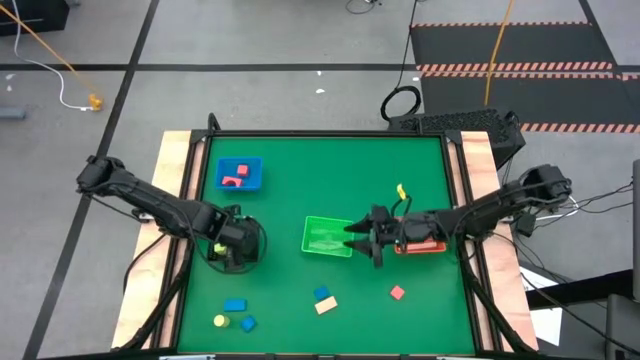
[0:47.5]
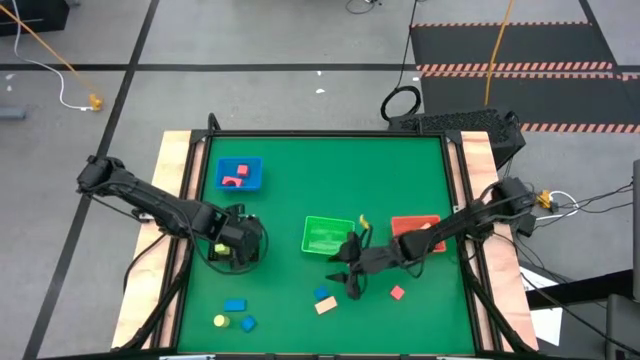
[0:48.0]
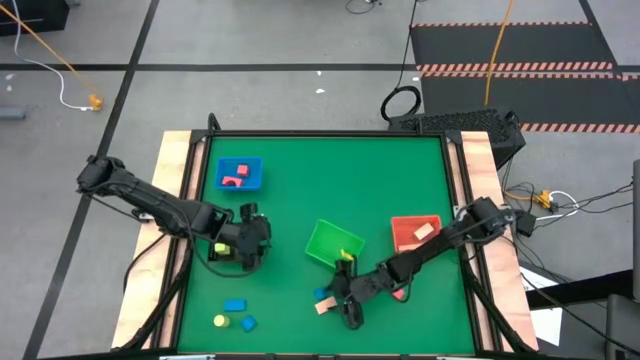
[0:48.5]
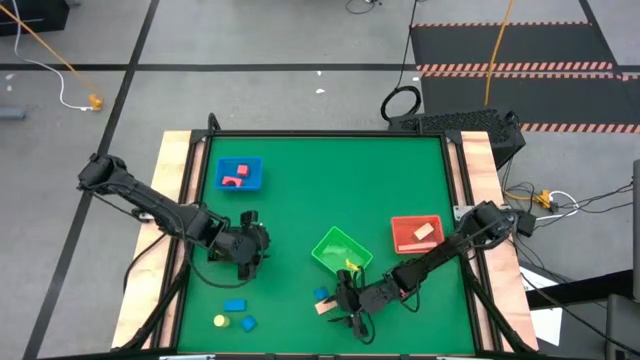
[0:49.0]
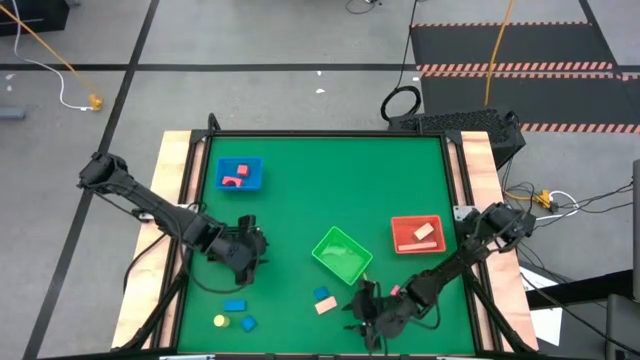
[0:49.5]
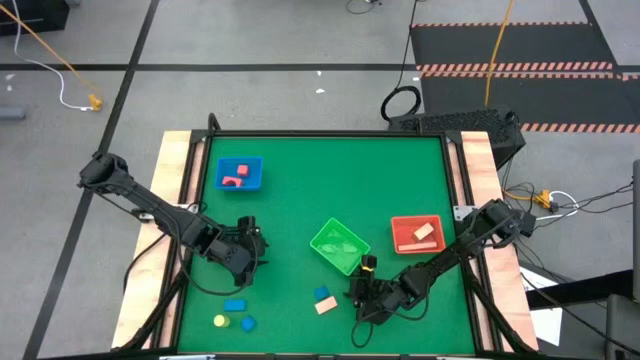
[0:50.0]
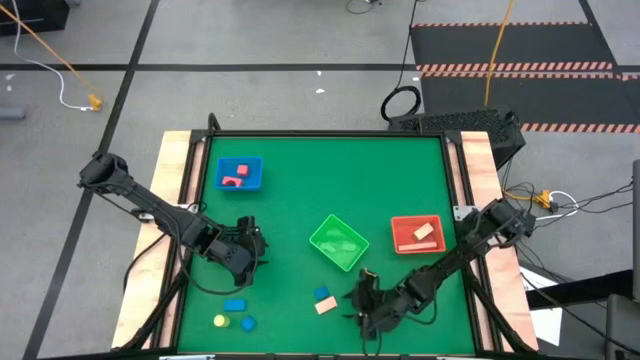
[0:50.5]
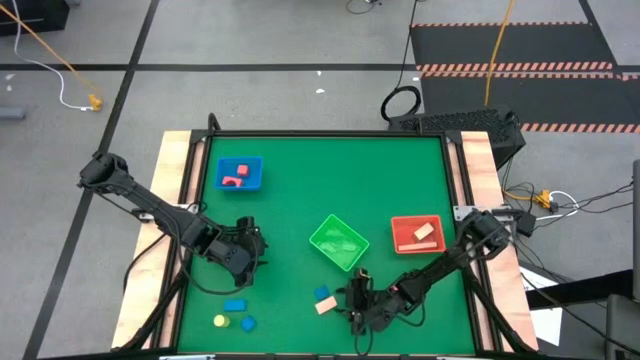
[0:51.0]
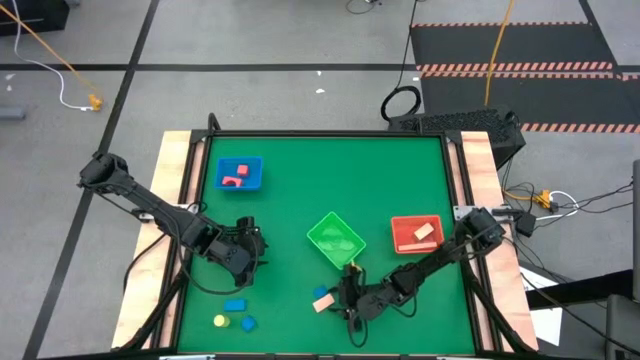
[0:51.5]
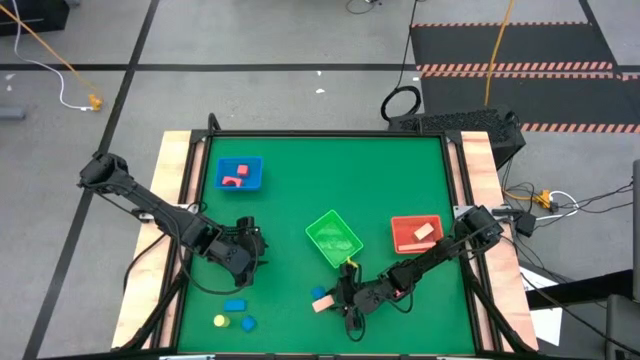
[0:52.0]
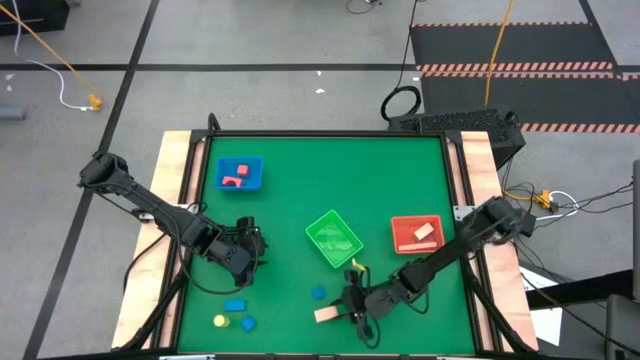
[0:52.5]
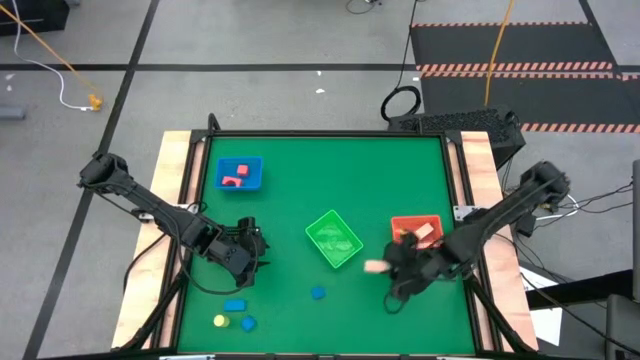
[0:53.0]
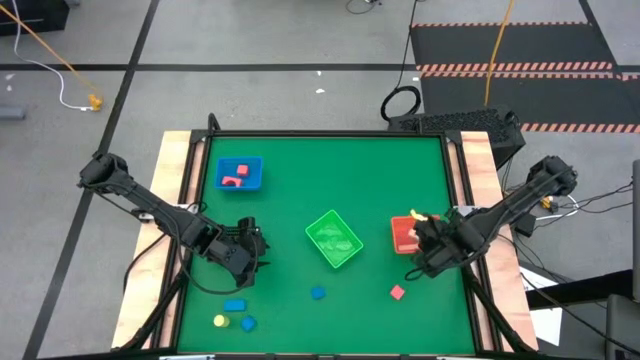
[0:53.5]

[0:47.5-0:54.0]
Task: Sort & place blocks by color
Put the brown block into the orange basket

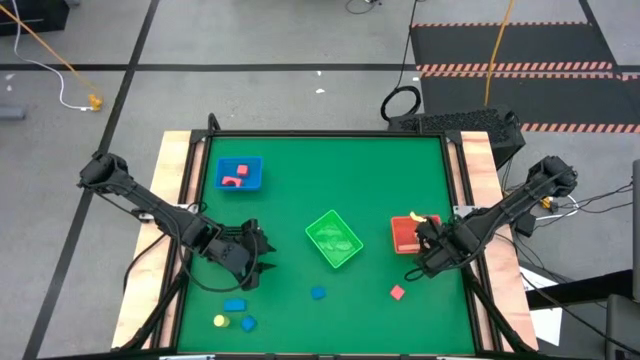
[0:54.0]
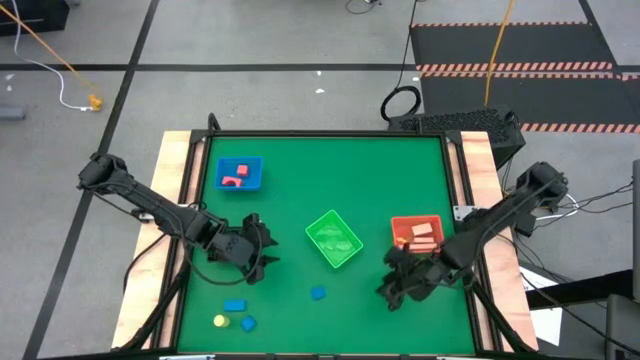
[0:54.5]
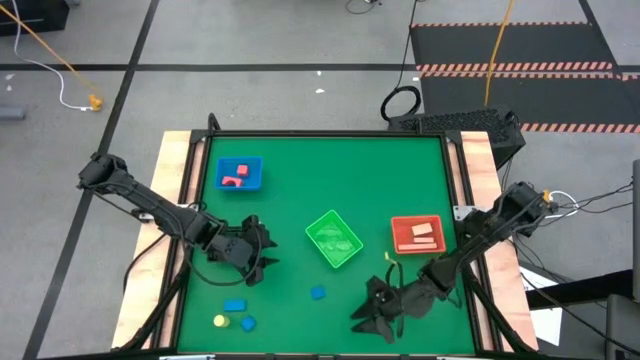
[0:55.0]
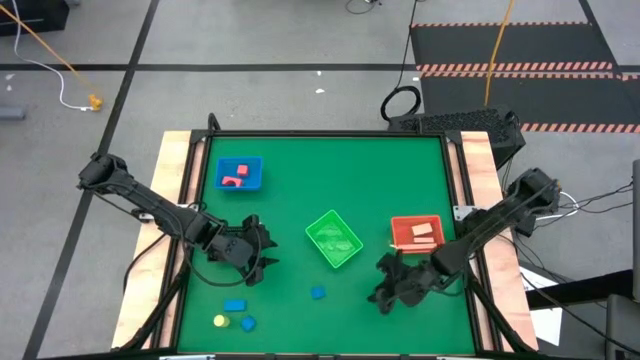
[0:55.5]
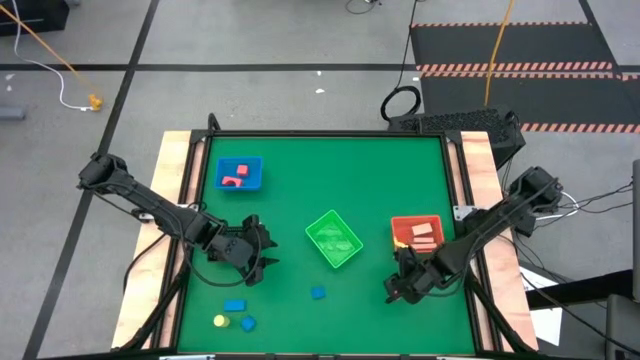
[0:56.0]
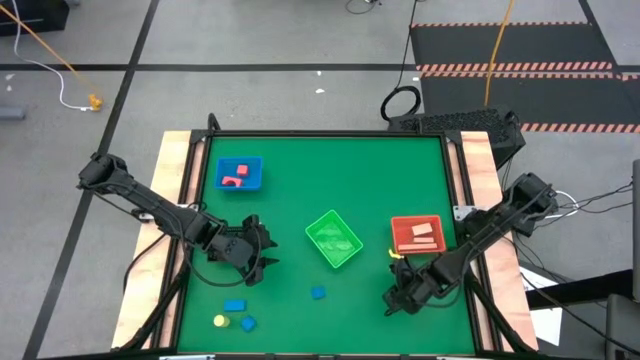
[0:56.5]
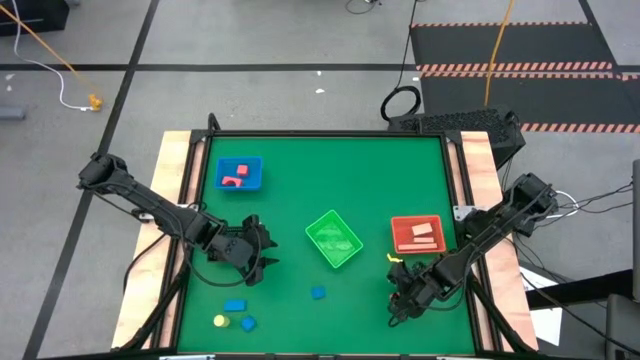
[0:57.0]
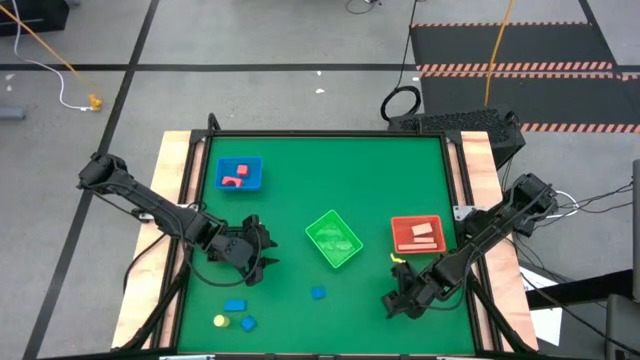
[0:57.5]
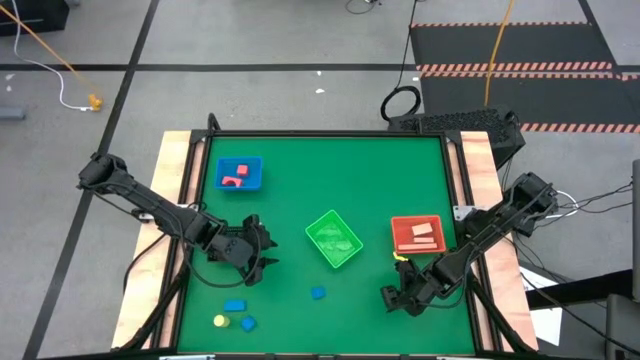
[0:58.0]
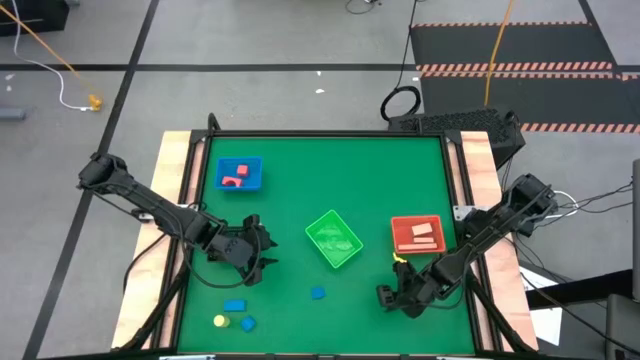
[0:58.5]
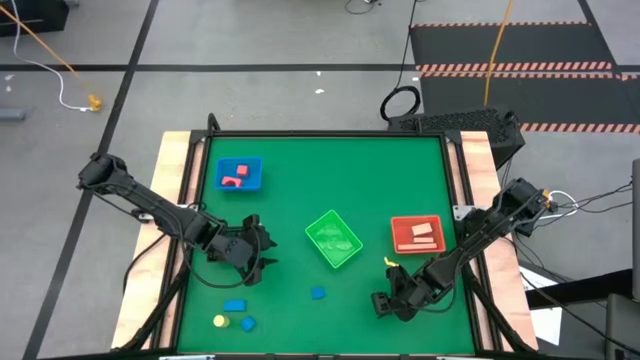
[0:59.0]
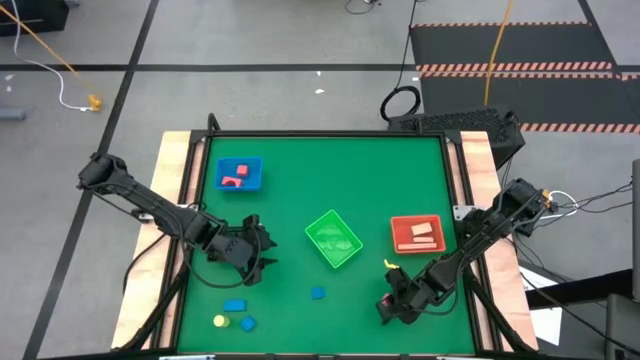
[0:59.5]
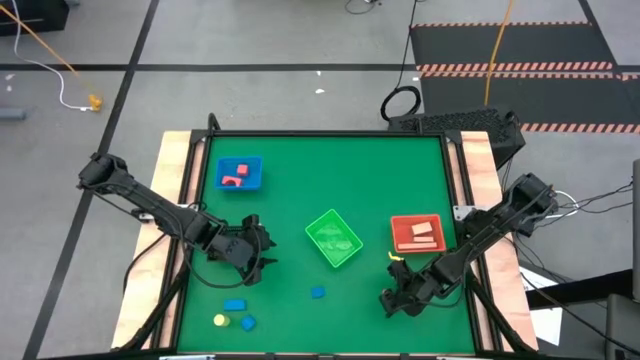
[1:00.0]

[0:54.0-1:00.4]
Put the orange block into the blue basket

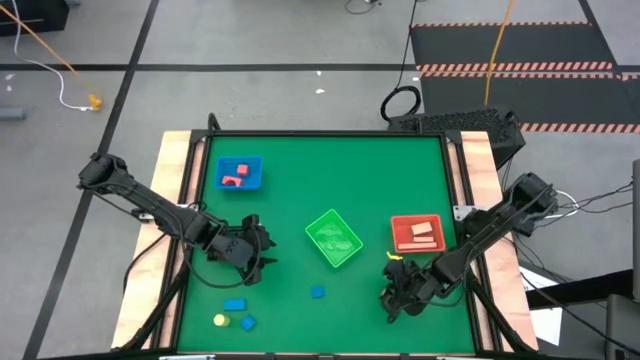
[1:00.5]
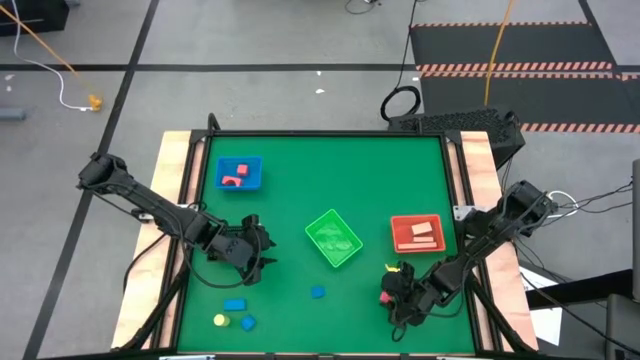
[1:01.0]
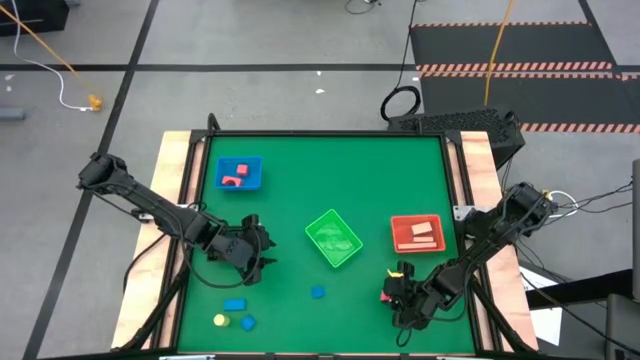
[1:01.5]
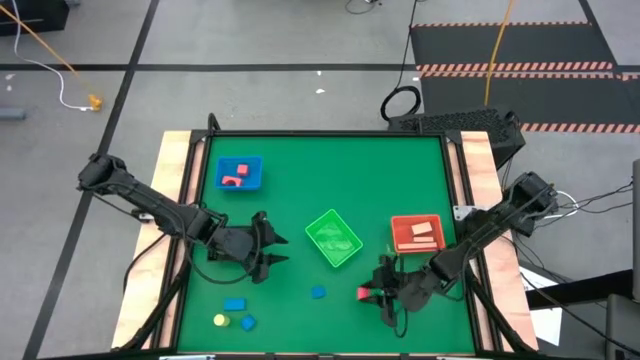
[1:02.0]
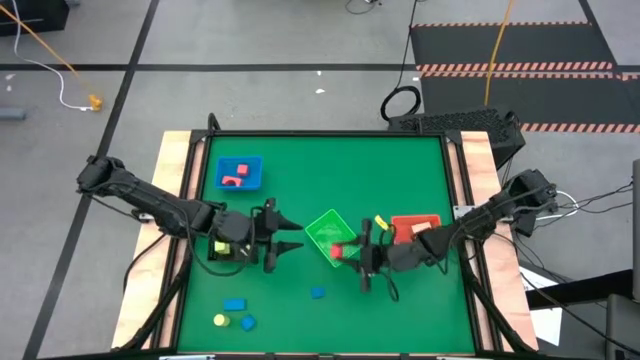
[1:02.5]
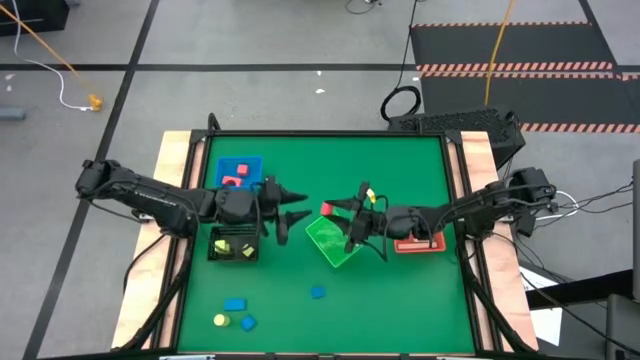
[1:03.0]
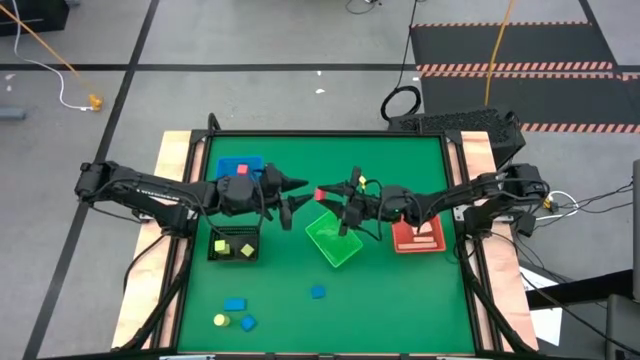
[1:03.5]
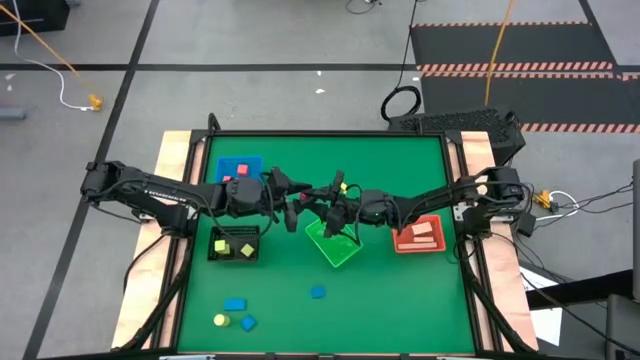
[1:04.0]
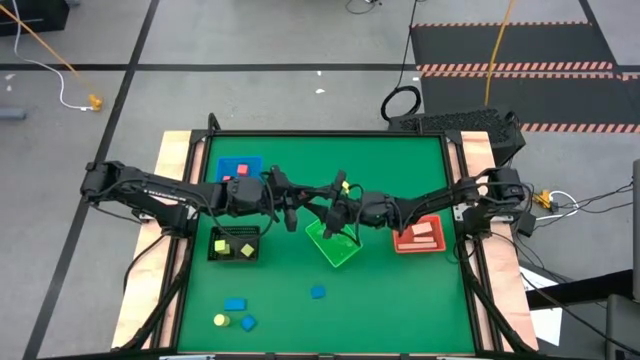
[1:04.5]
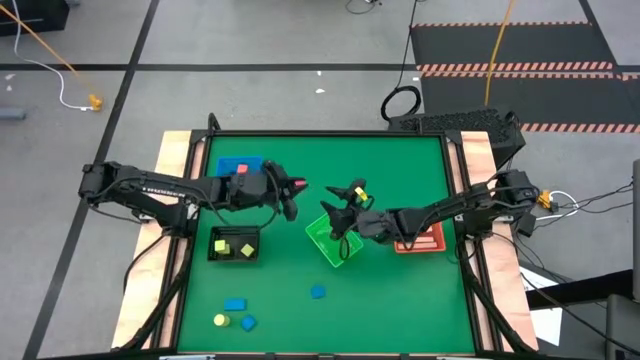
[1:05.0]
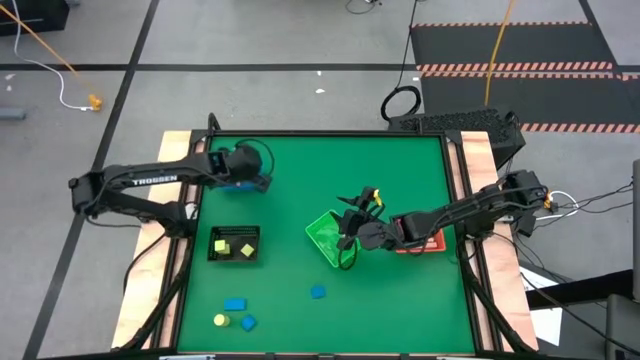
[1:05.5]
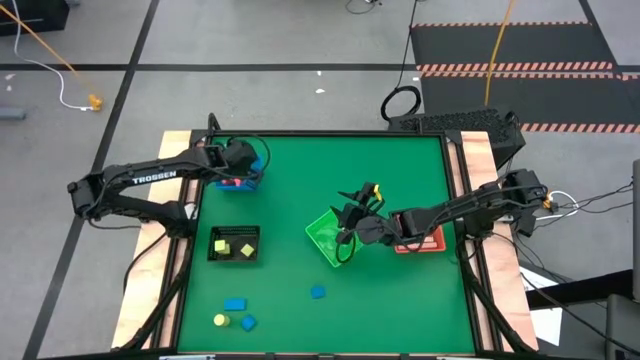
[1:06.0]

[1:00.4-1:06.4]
Put the orange block into the blue basket

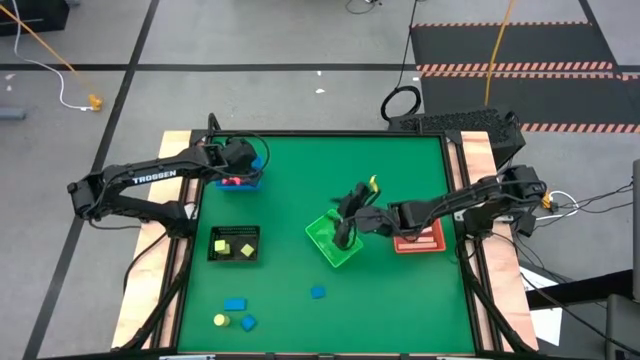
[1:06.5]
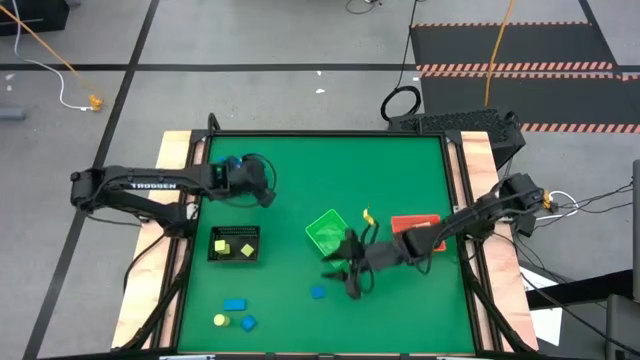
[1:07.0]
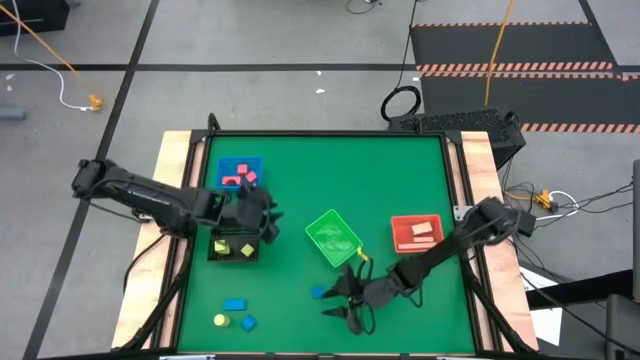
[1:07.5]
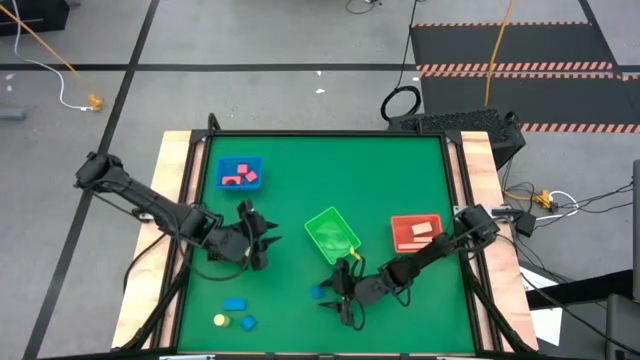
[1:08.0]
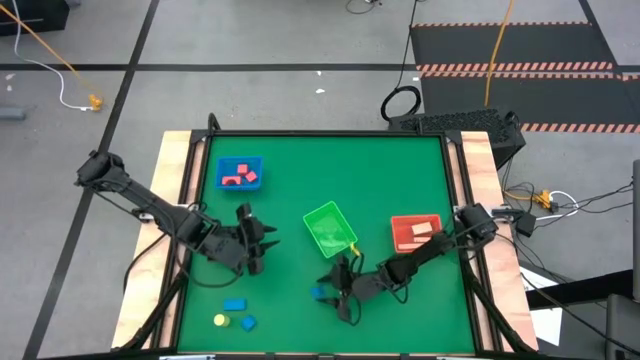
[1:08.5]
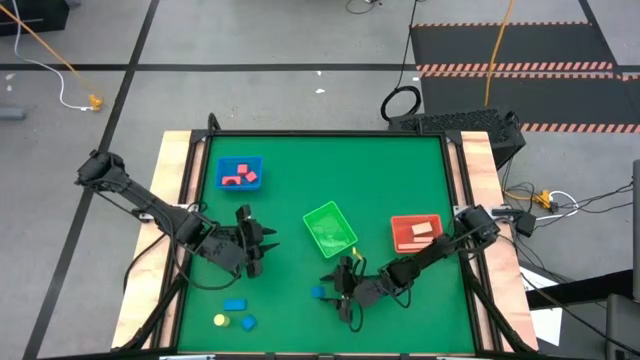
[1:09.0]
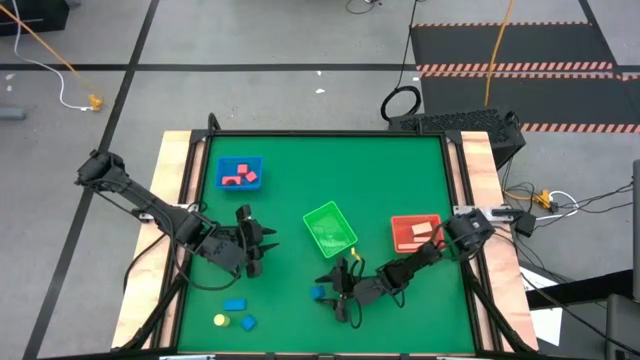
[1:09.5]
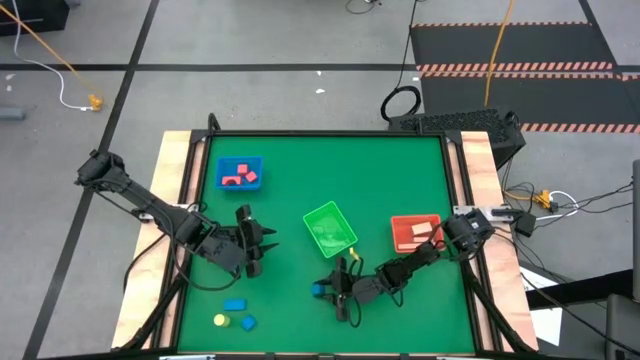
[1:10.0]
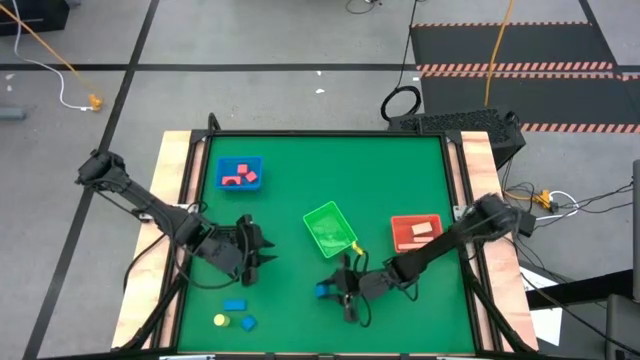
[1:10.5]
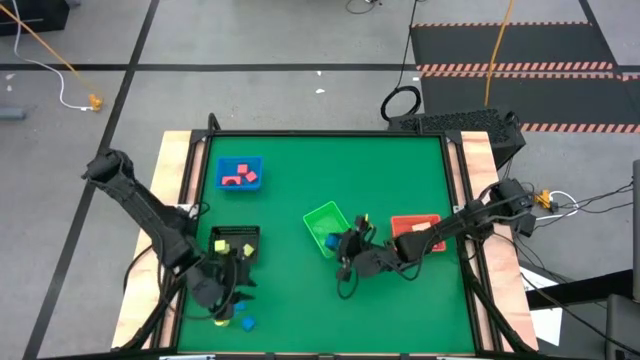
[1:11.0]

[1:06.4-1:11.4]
Put the right blue block into the green basket
